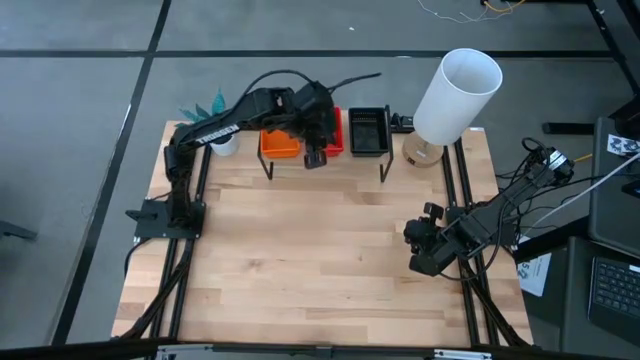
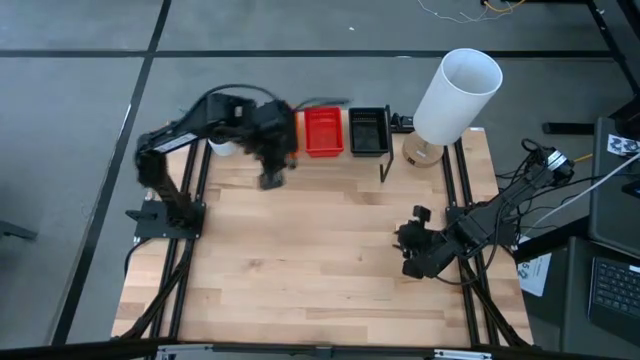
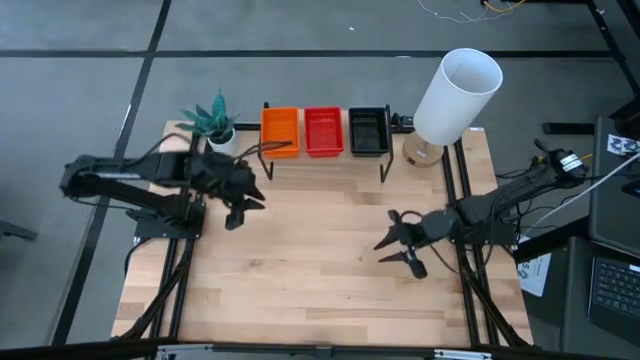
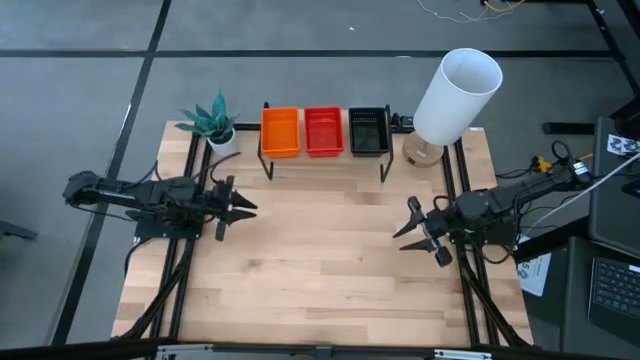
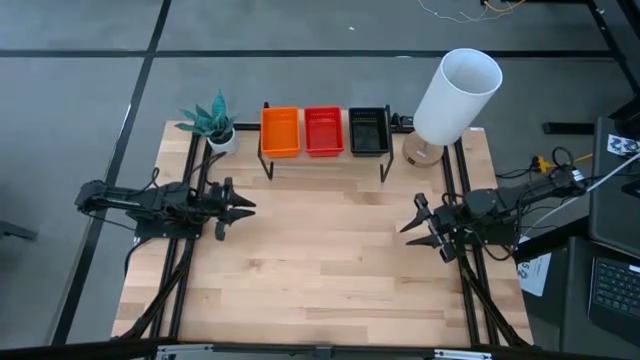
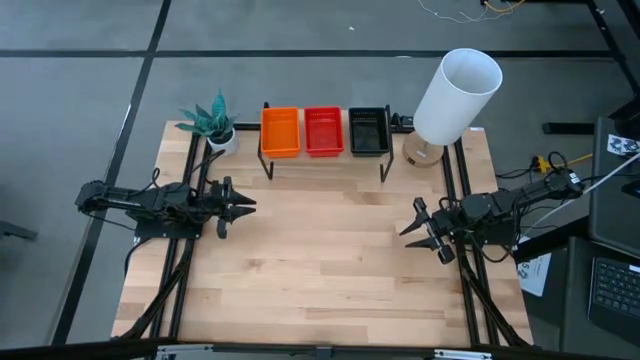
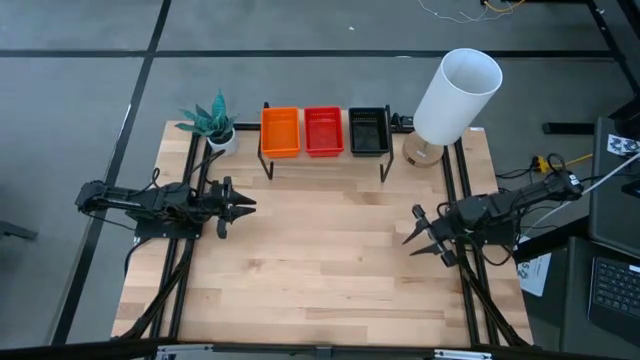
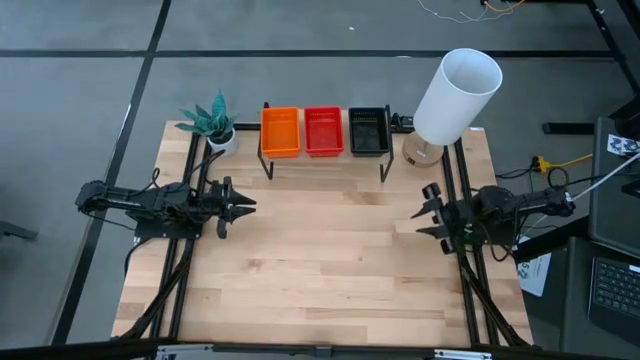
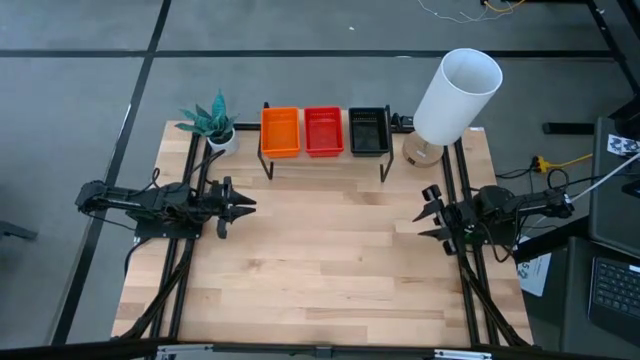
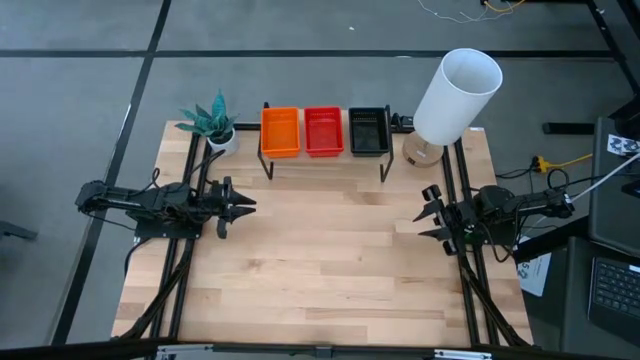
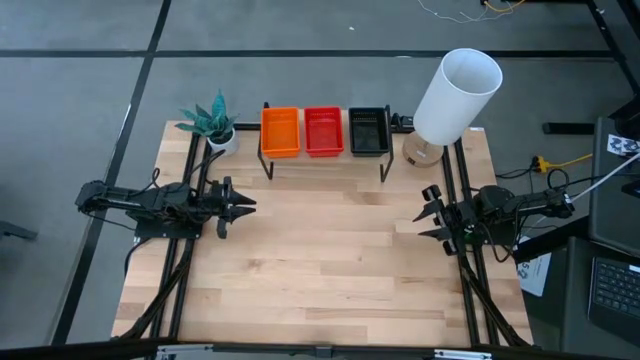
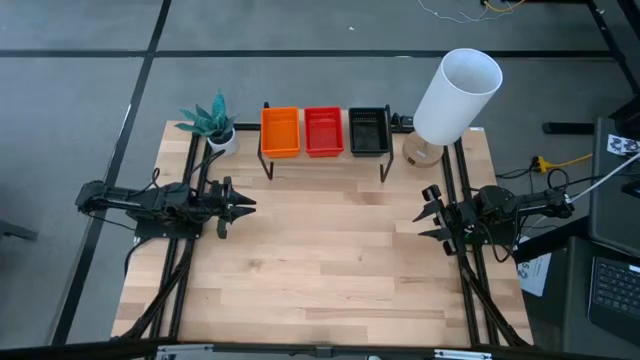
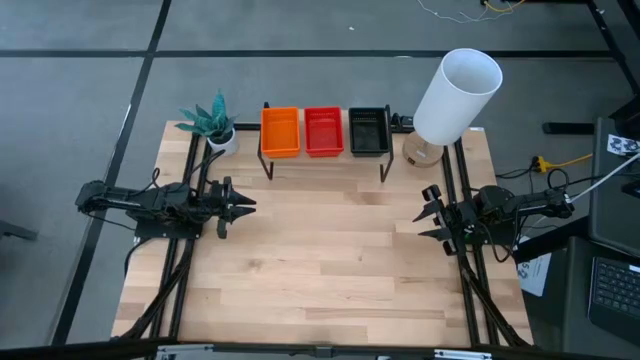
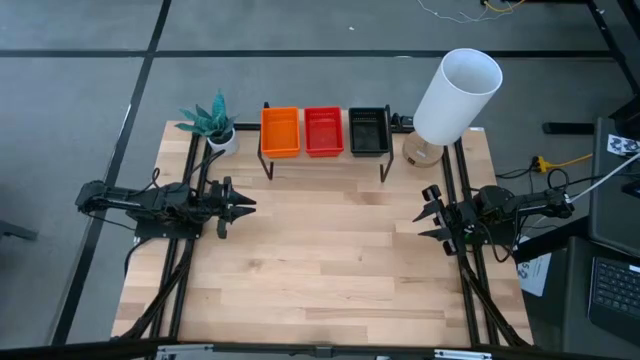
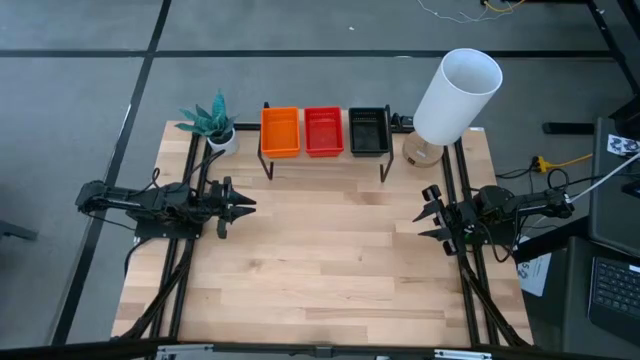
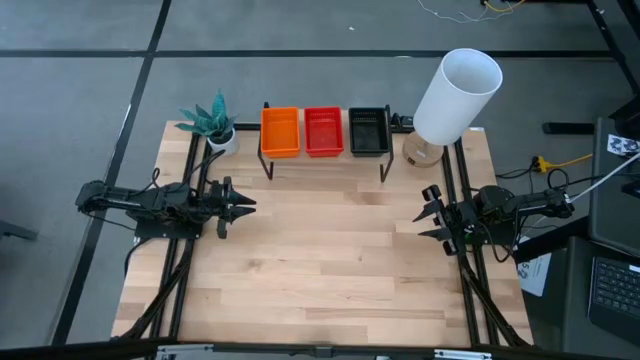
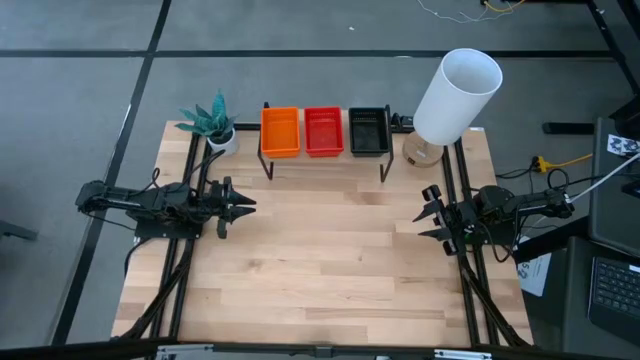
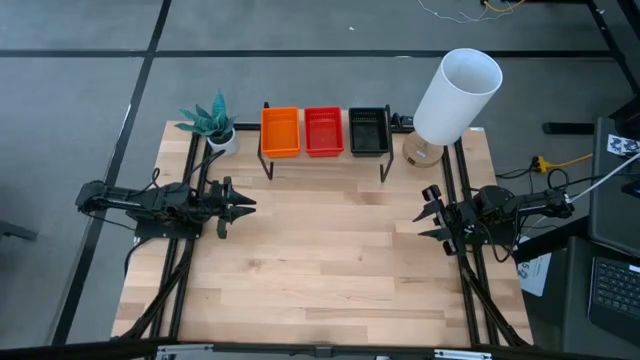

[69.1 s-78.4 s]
Task: Stack baskets on shelf by color
Return to Home Position

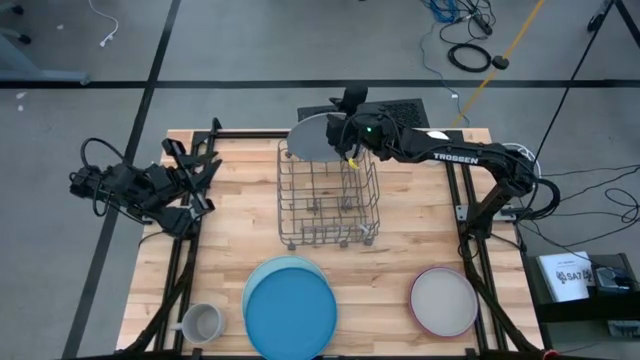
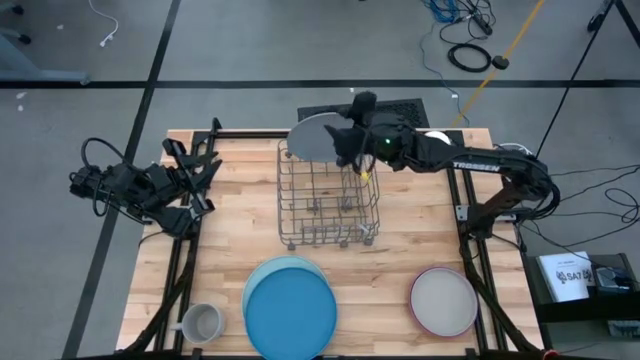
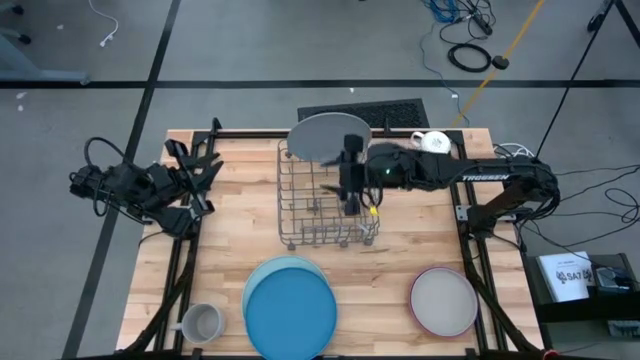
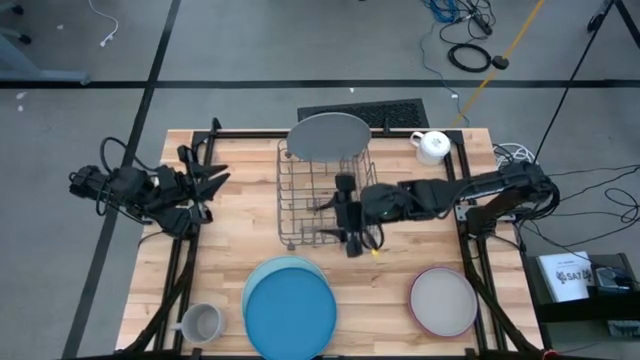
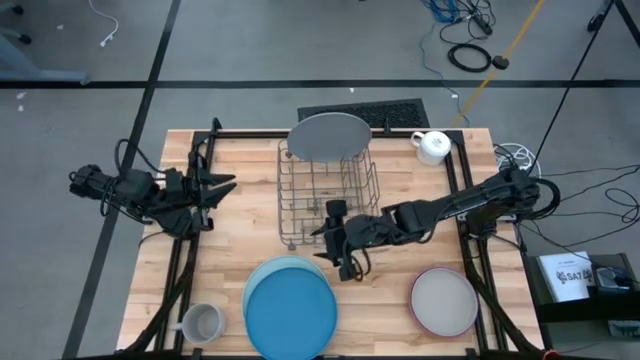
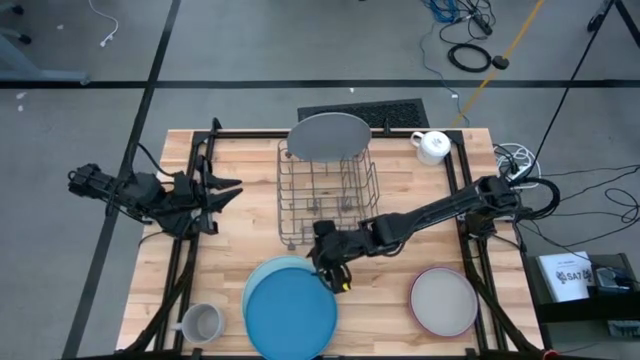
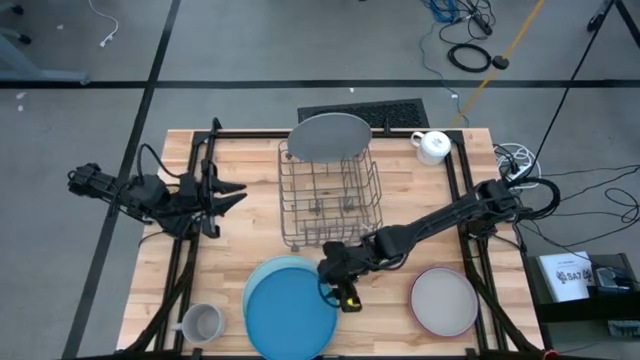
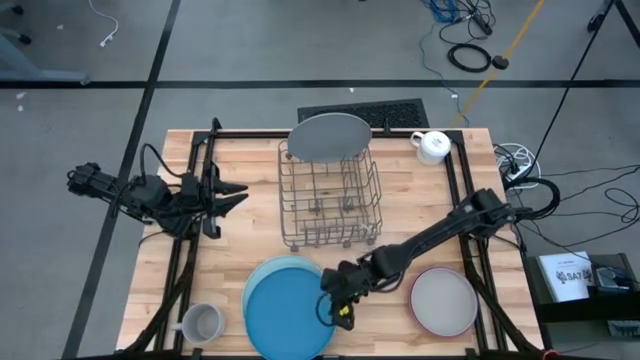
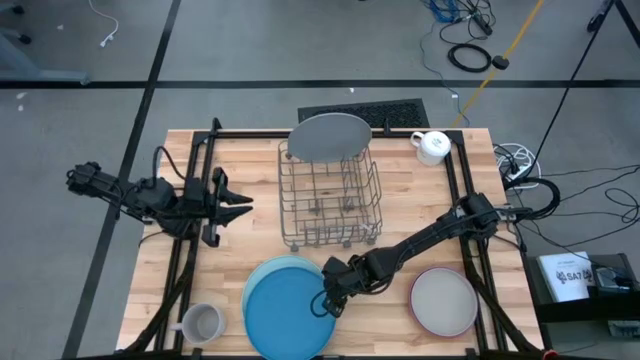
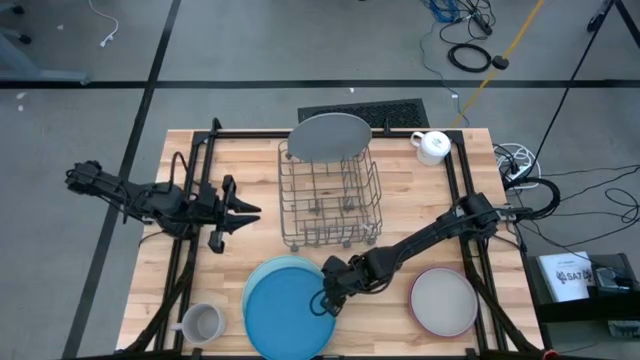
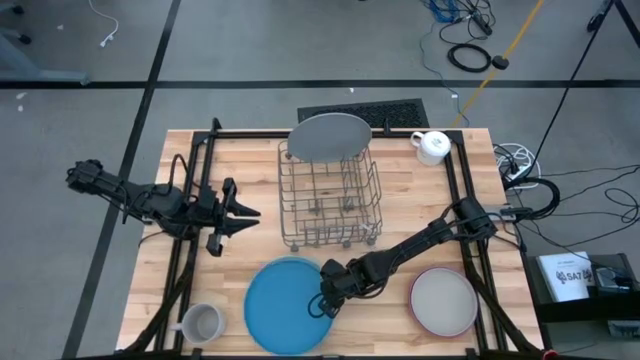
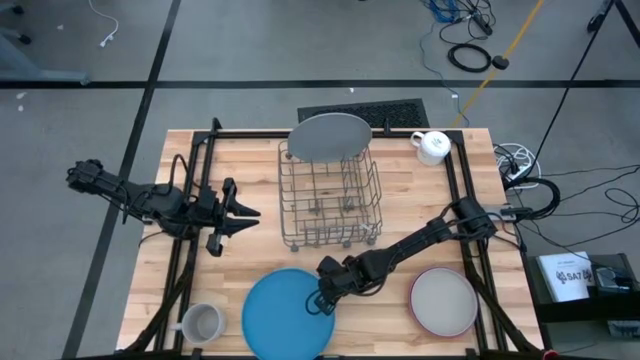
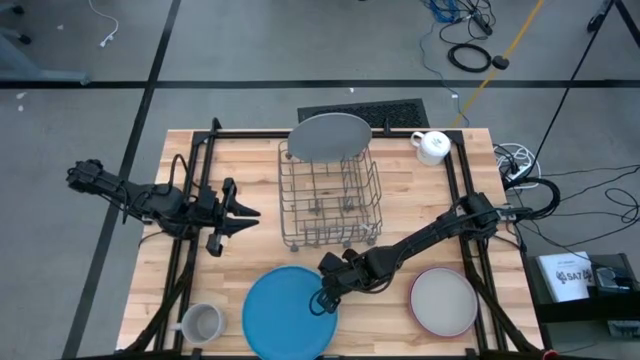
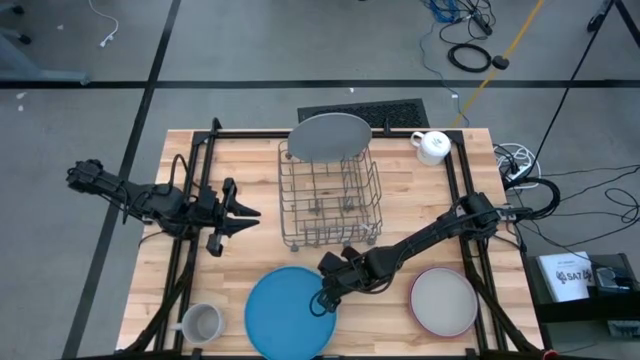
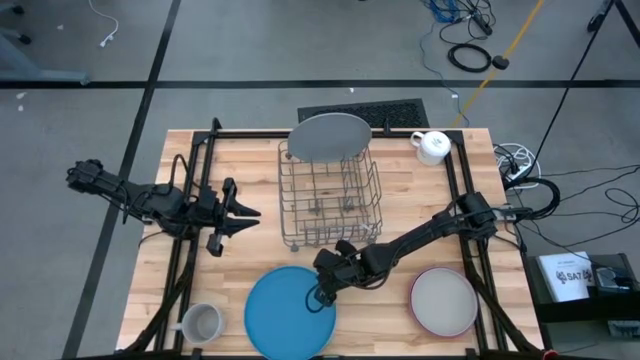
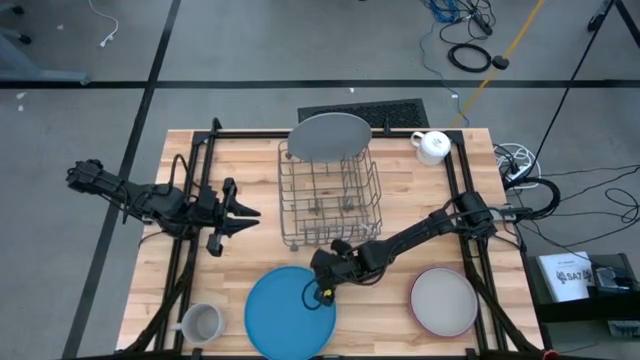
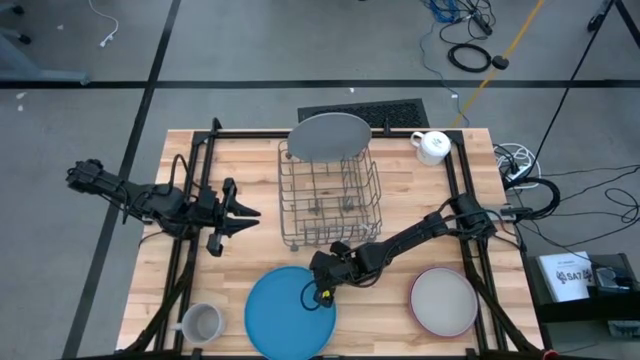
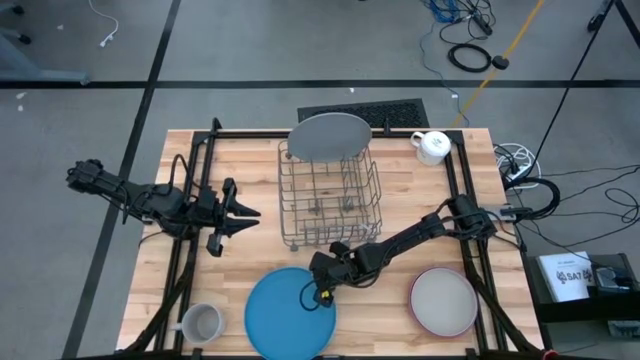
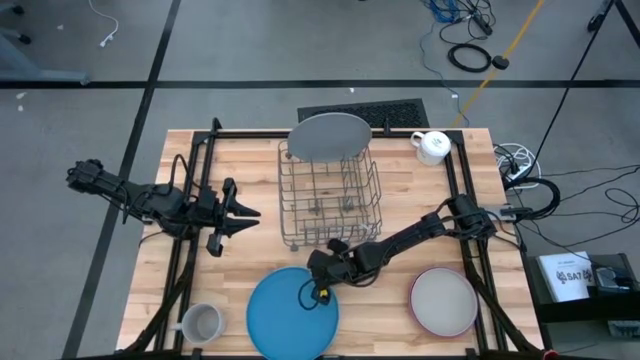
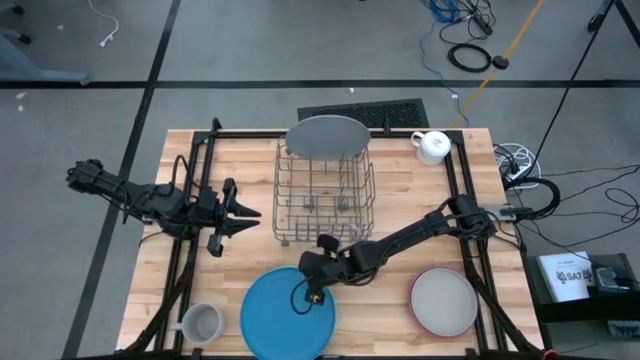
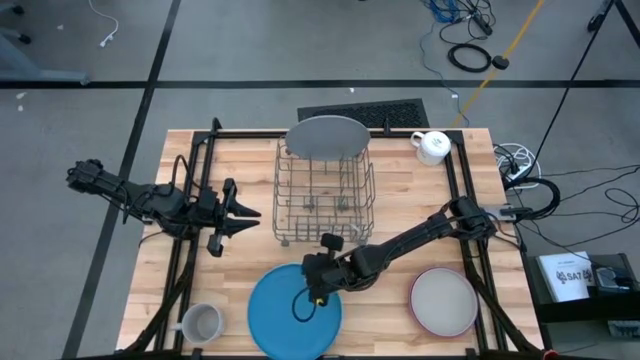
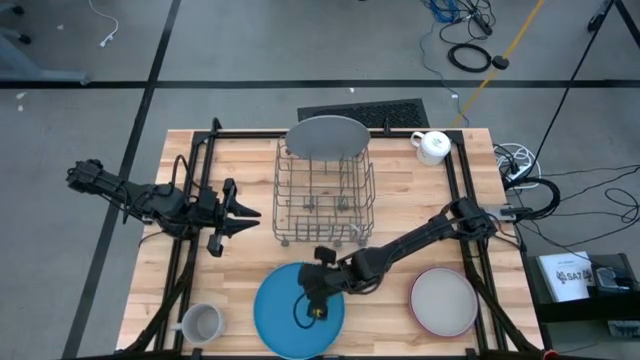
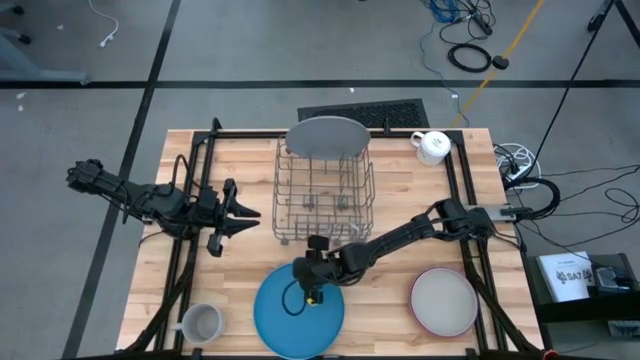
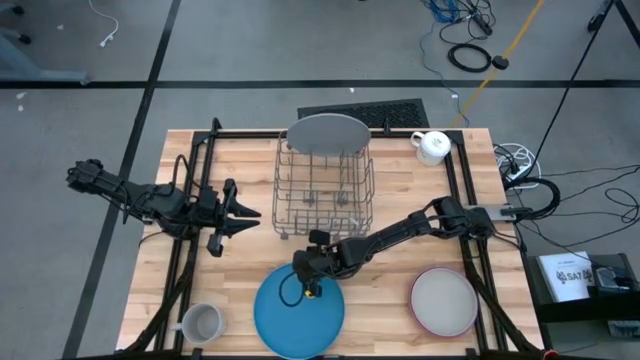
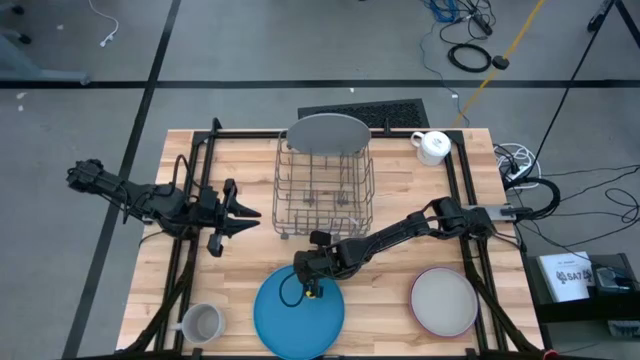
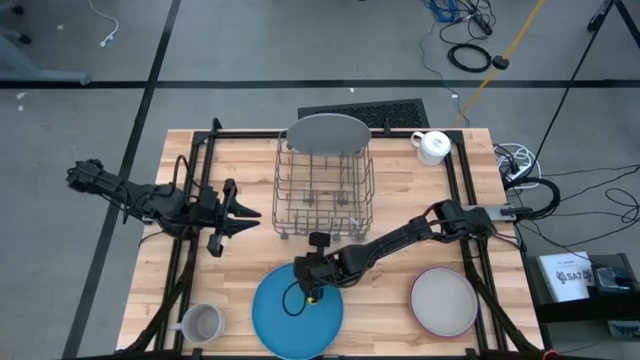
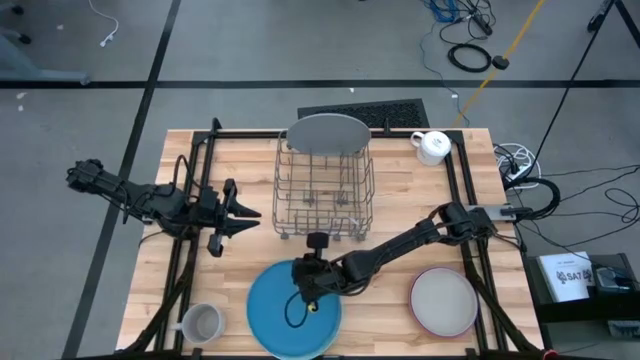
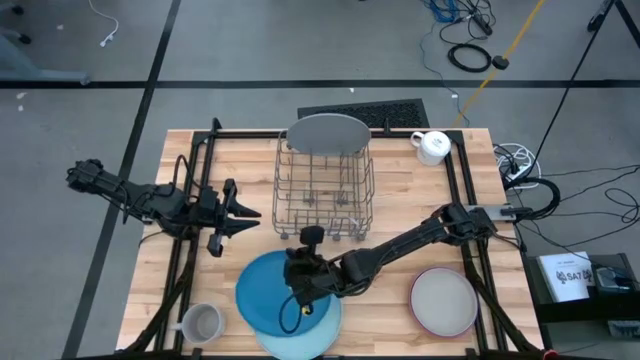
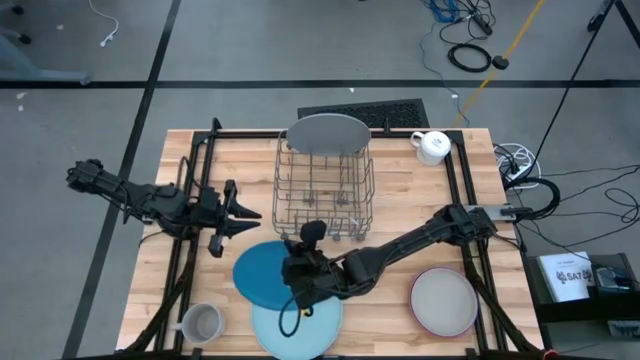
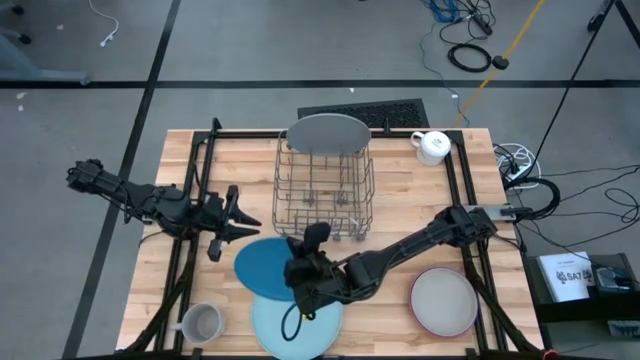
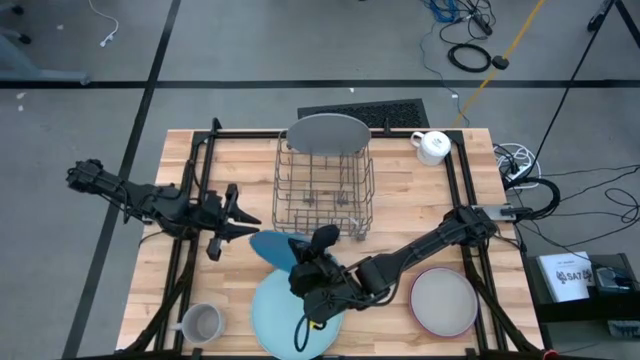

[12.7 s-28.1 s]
Task: Sort dishes
Put the blue plate into the dish rack
